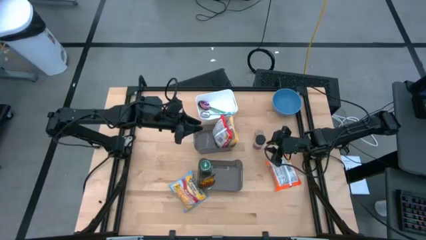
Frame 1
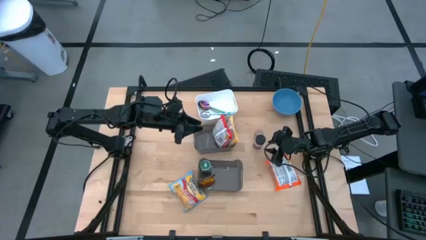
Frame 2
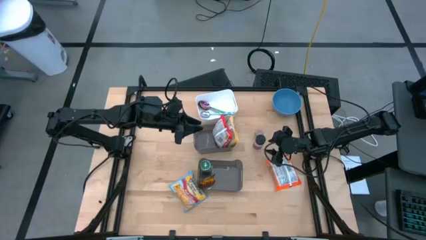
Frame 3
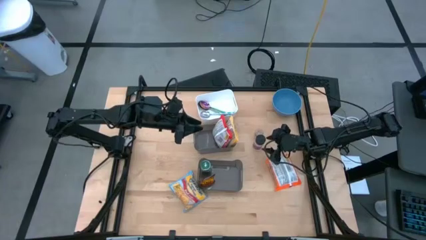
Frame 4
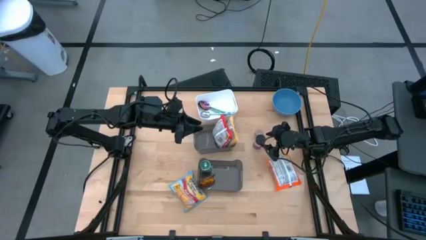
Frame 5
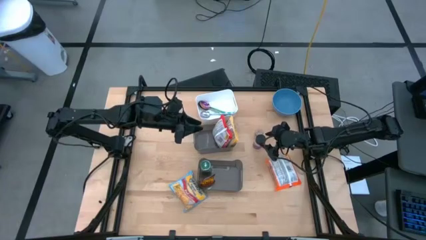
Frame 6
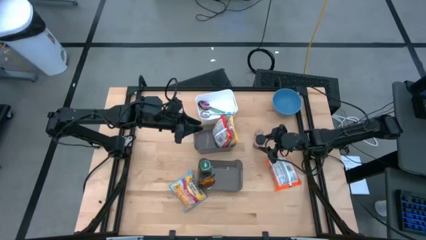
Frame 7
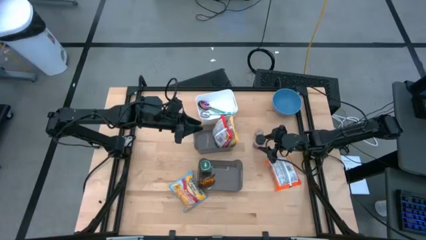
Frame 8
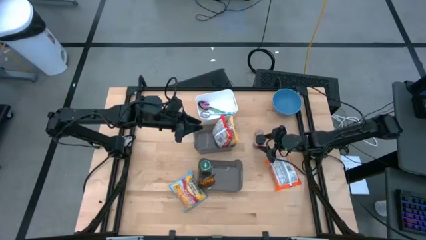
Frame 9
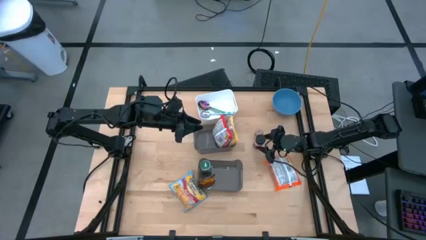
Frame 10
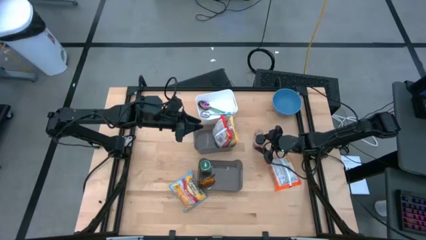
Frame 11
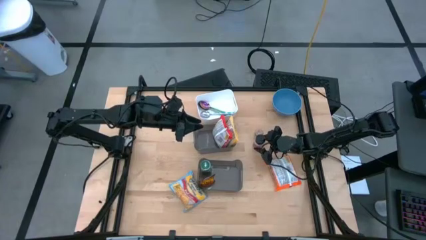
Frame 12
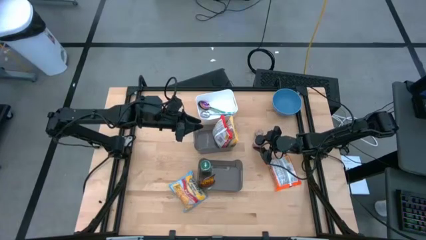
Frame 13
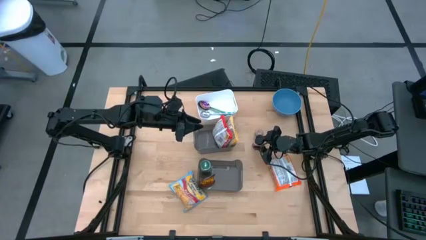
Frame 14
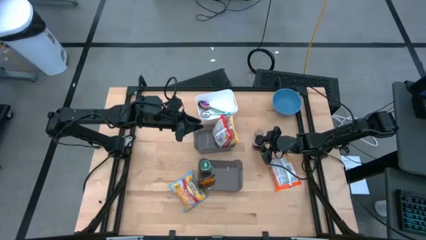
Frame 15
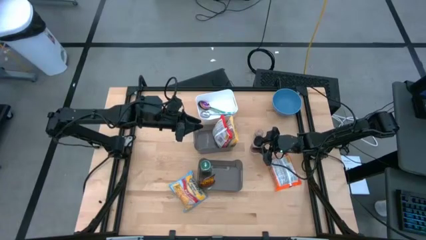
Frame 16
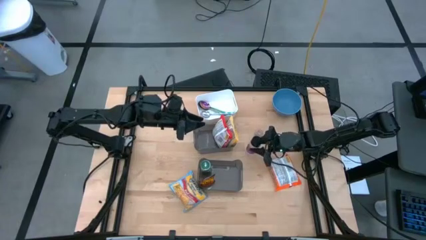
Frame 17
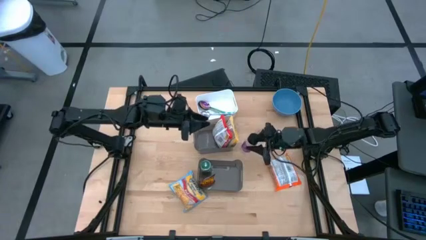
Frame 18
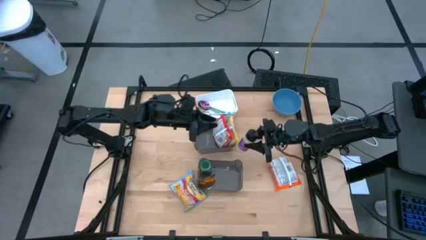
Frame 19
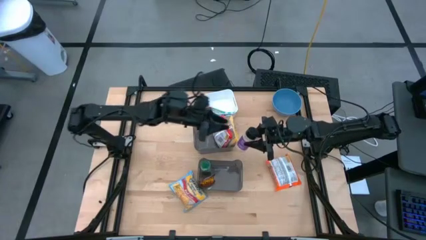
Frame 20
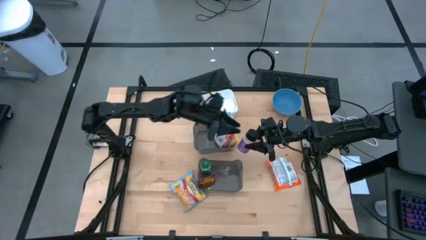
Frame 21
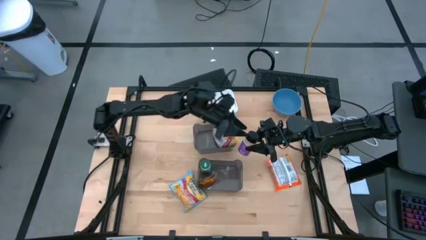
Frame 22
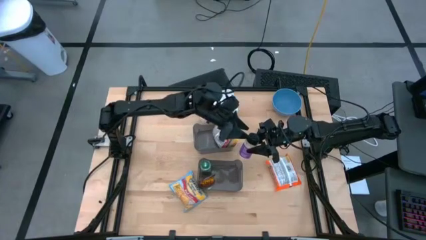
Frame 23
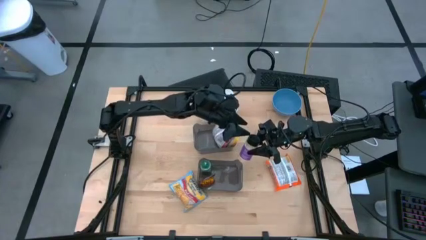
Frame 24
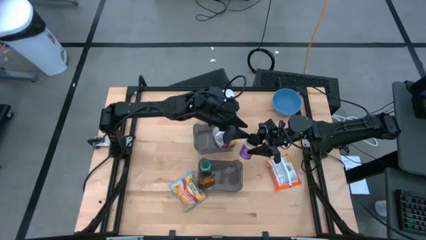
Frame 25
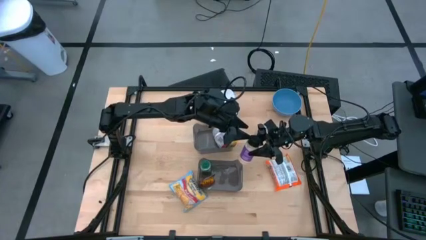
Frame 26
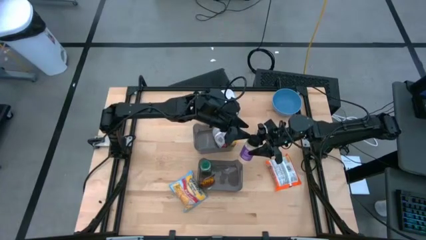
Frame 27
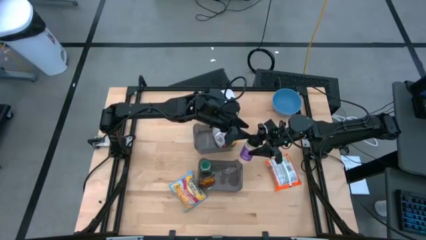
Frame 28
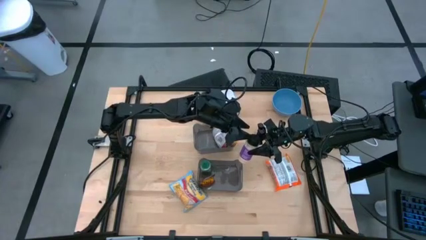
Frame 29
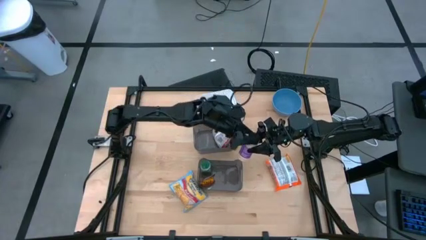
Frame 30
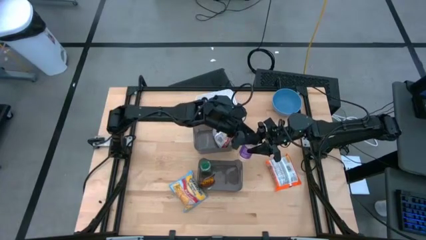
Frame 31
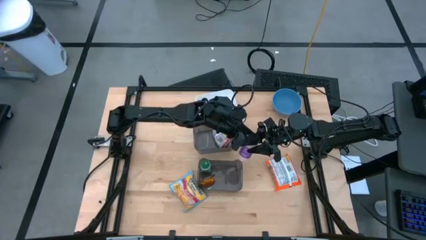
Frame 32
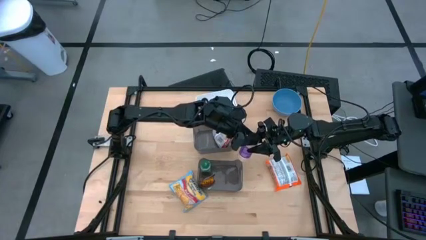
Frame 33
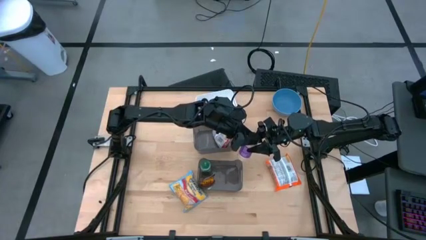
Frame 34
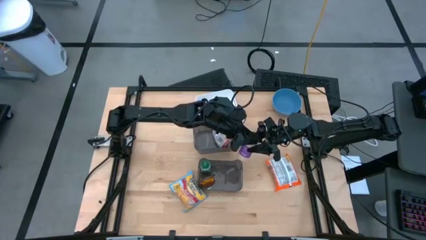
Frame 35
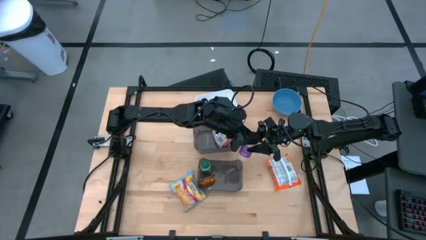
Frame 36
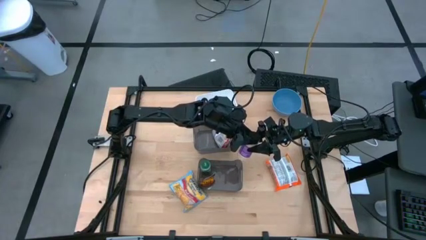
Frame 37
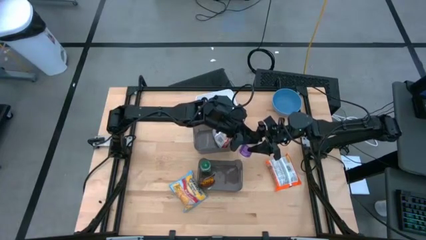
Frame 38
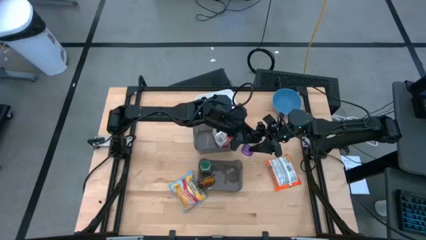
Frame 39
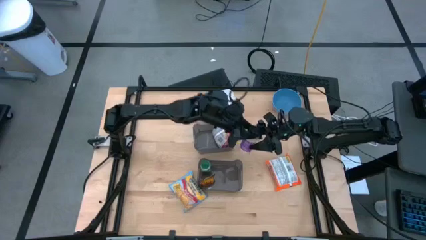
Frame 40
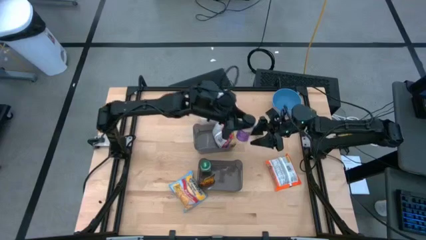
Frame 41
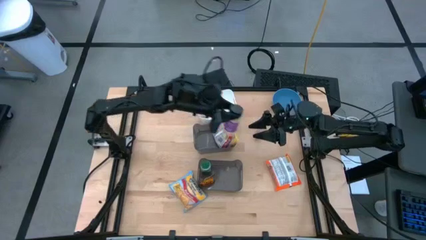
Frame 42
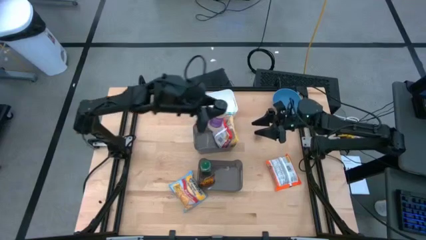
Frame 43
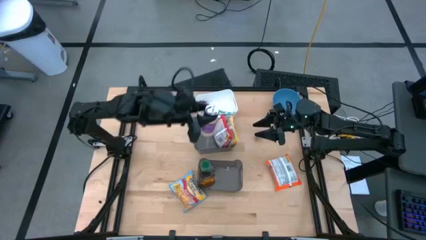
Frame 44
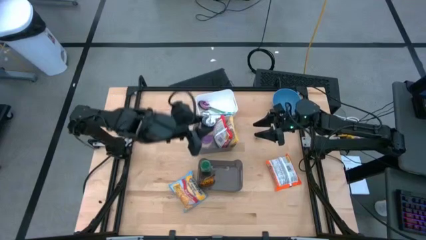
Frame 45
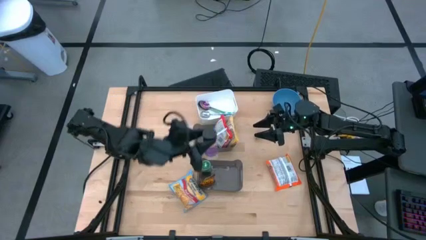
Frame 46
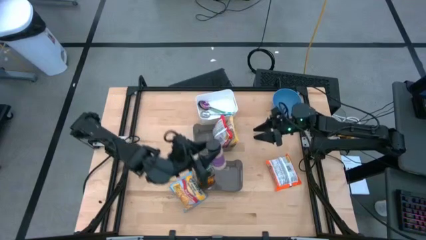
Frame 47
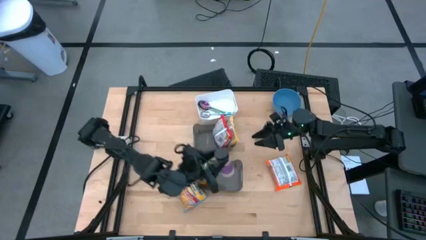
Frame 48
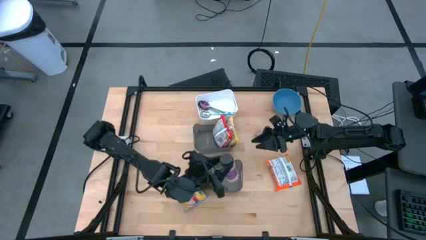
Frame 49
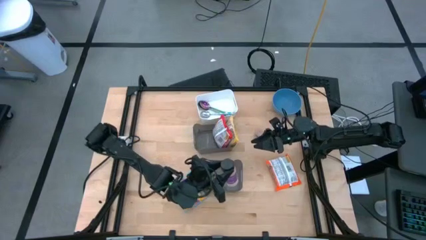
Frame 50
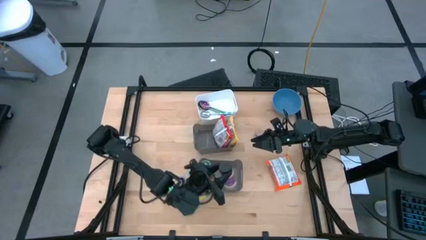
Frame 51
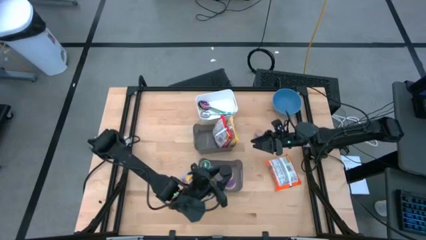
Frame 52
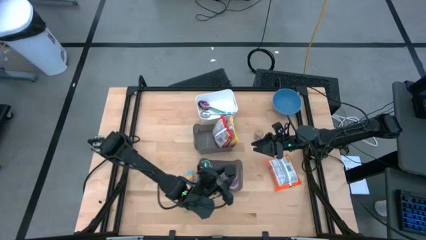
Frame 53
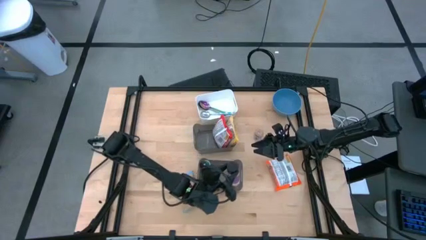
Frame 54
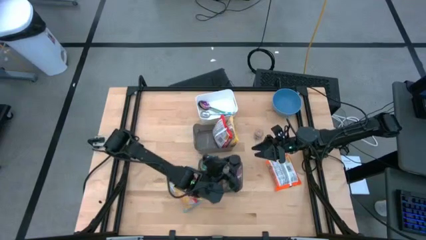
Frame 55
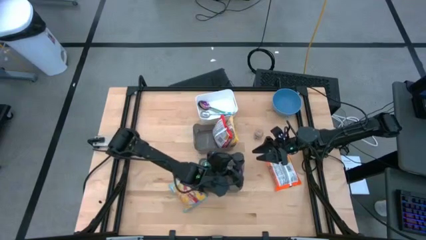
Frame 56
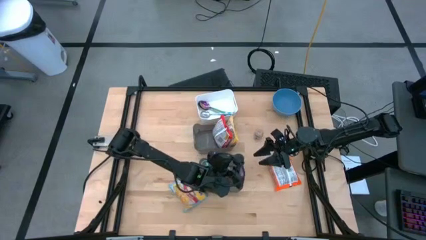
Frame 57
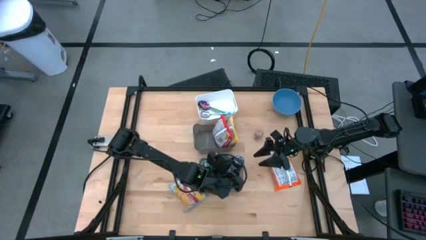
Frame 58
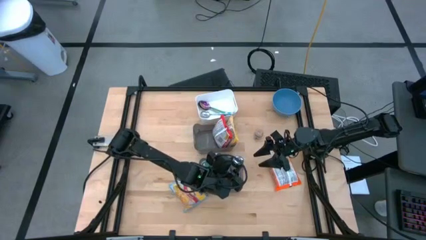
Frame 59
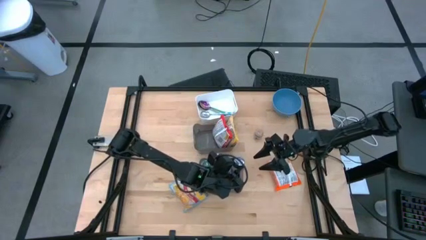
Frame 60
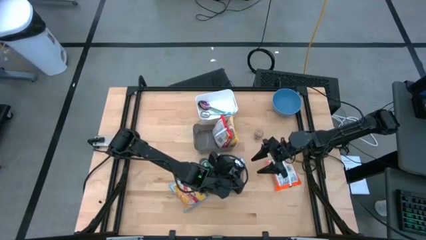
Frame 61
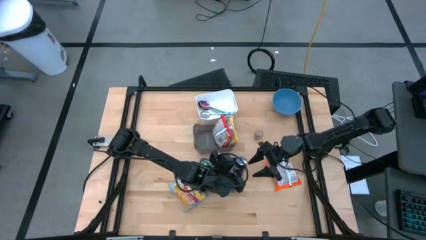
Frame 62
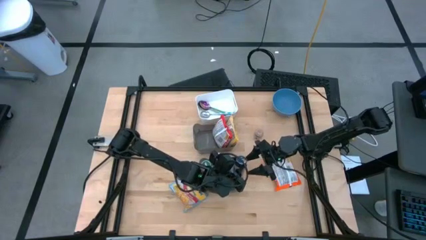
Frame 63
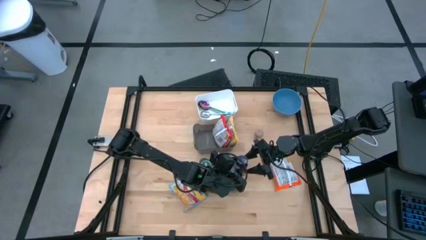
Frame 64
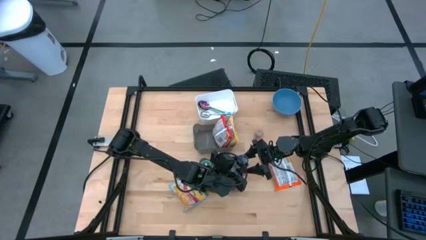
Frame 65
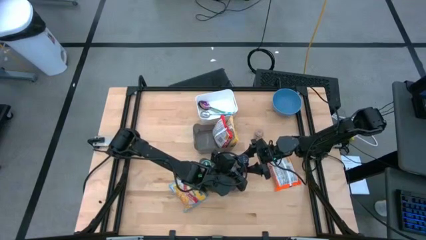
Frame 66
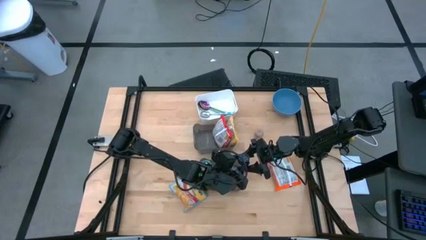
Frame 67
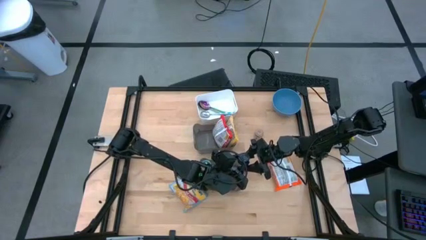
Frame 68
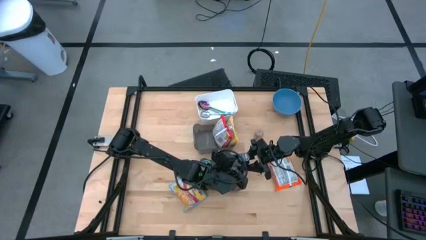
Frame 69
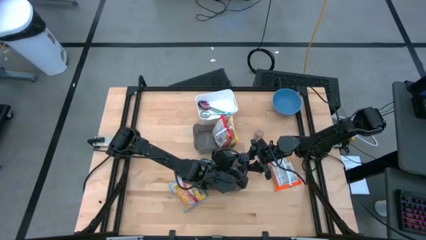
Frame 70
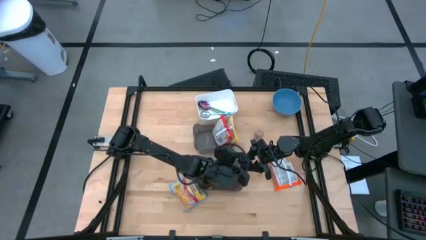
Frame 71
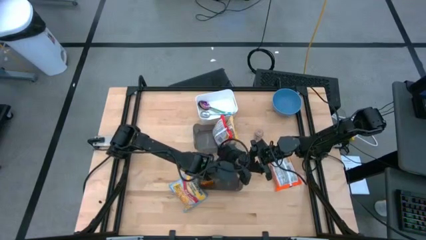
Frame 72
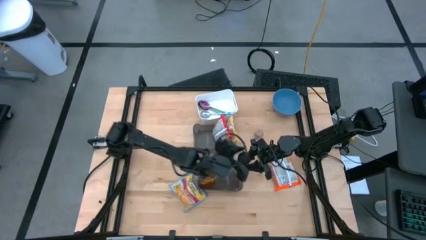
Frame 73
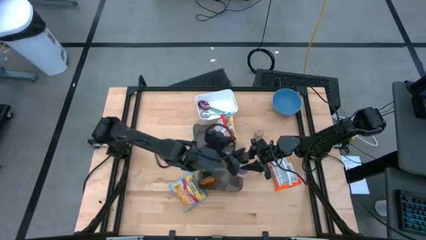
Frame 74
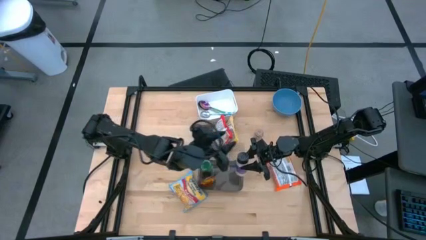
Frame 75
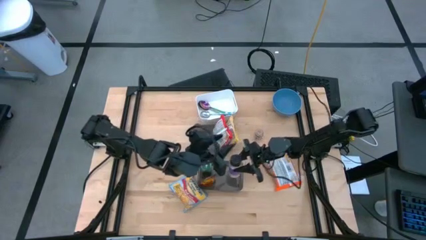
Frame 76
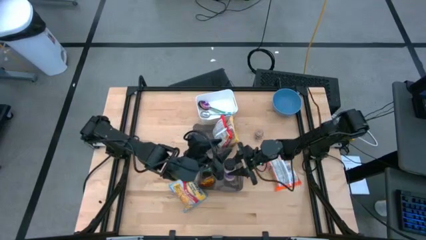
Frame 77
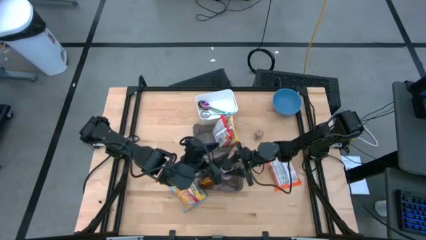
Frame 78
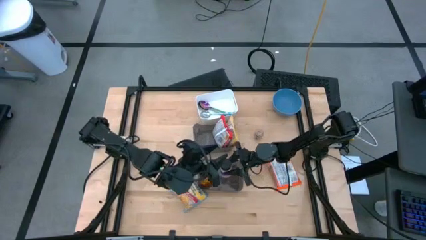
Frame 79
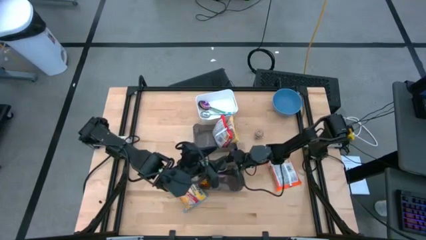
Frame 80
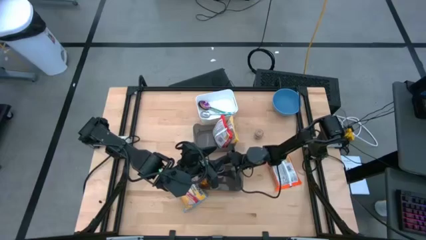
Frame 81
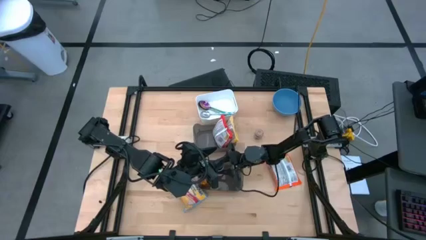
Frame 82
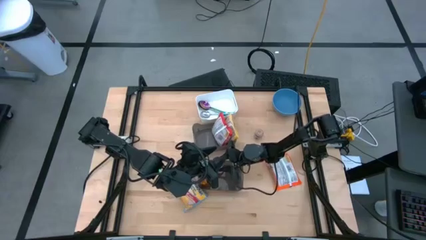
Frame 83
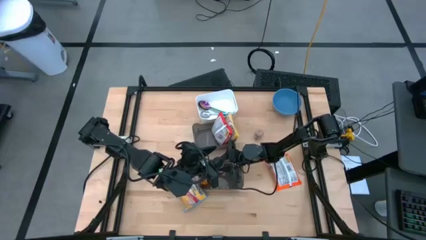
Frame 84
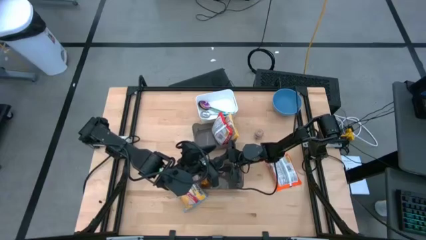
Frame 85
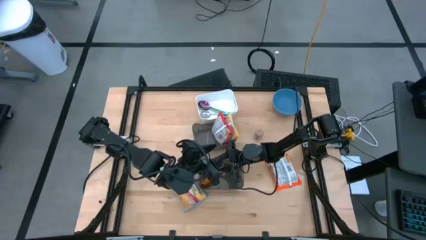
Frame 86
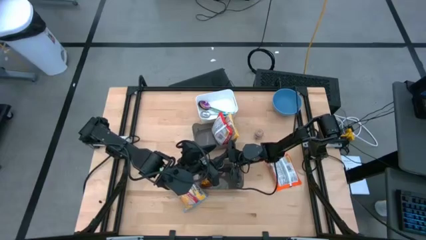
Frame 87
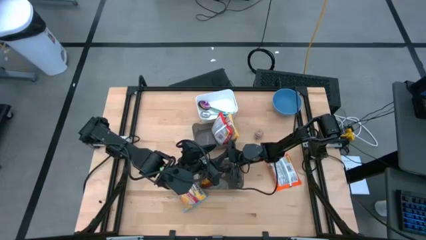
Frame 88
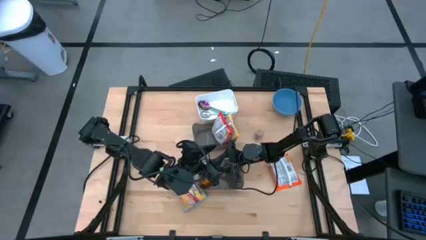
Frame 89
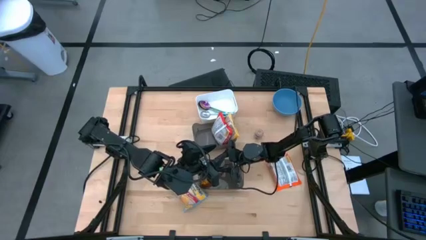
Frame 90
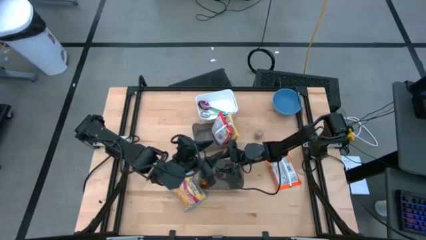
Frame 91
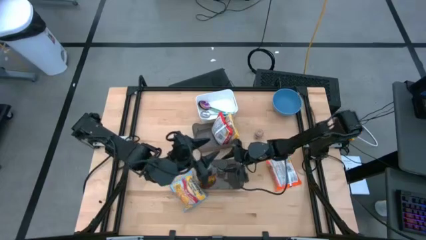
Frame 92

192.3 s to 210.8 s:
Task: Pick & Place Food Item
Put the black seasoning bottle into the bottom black bin
